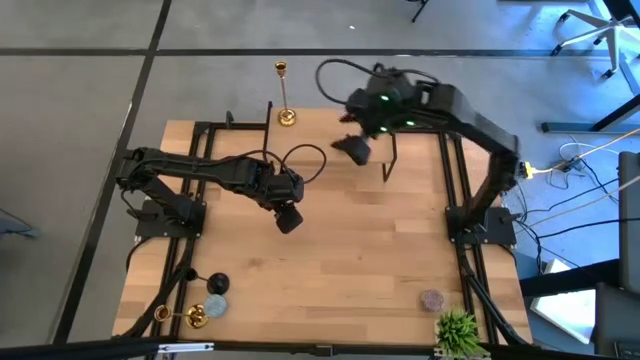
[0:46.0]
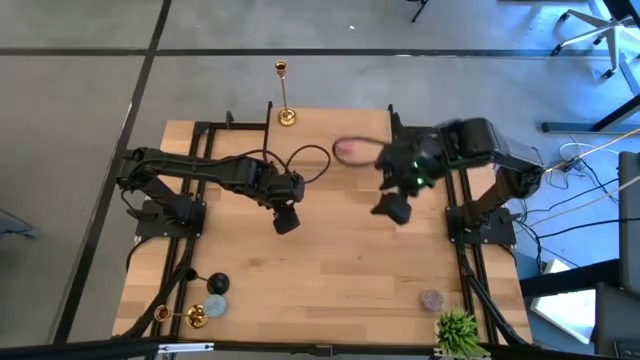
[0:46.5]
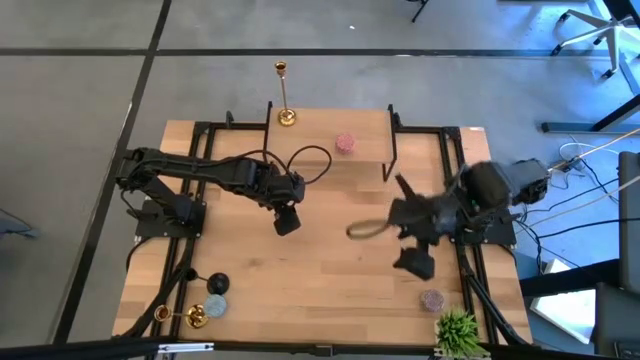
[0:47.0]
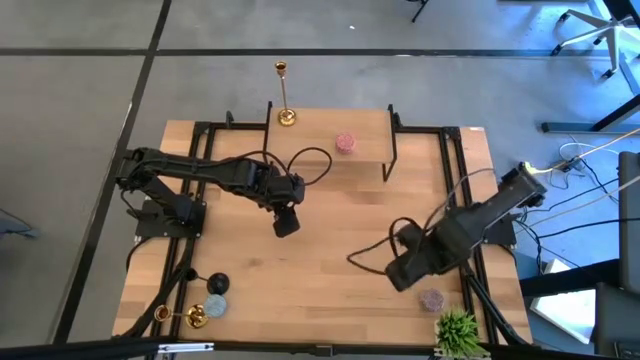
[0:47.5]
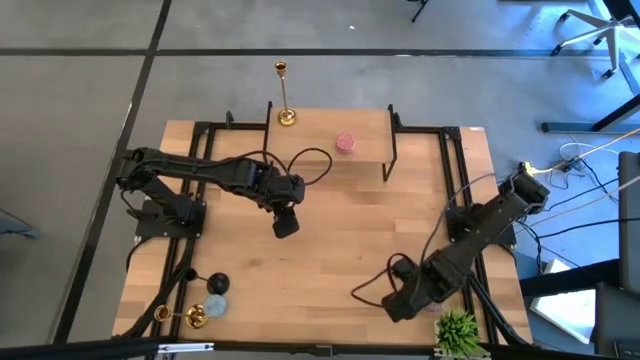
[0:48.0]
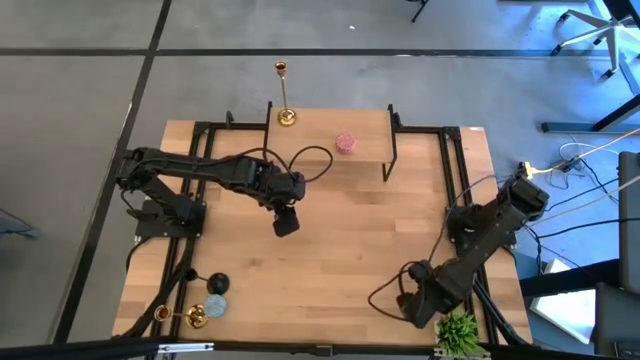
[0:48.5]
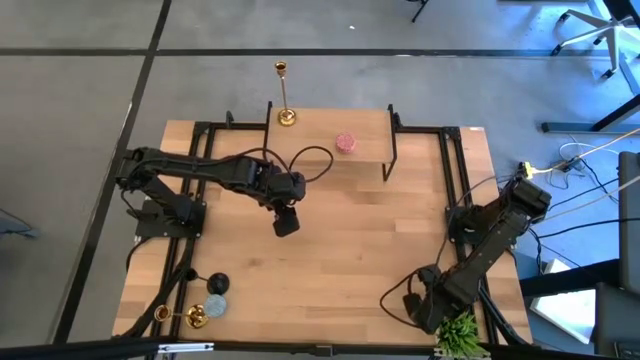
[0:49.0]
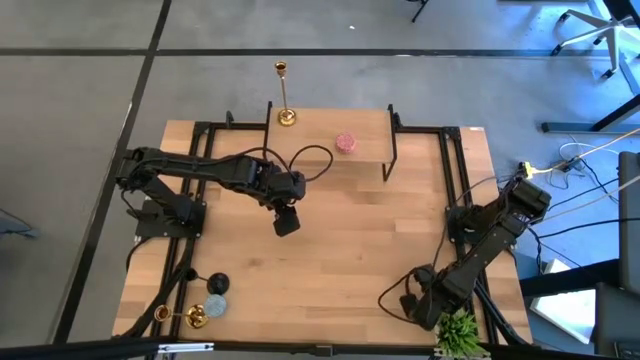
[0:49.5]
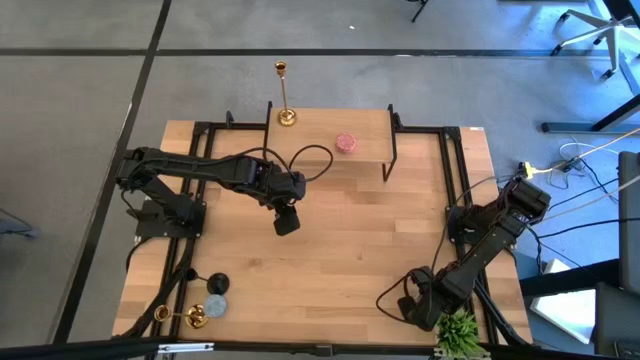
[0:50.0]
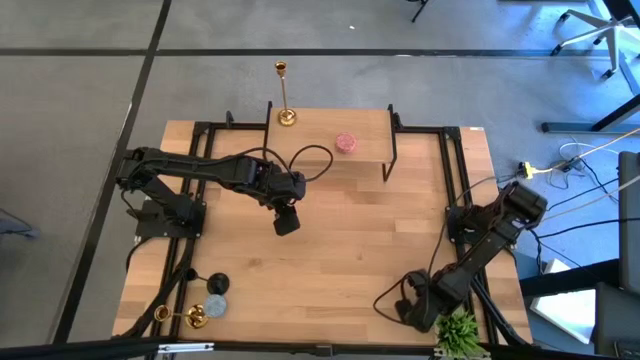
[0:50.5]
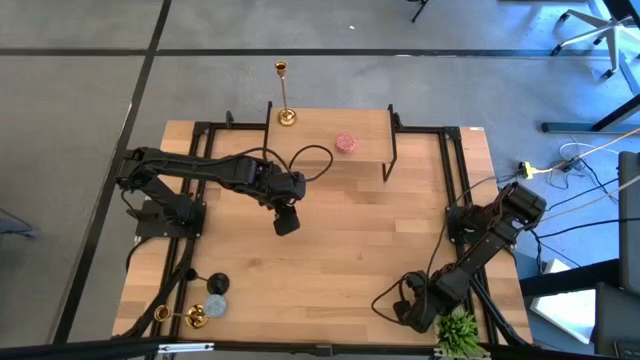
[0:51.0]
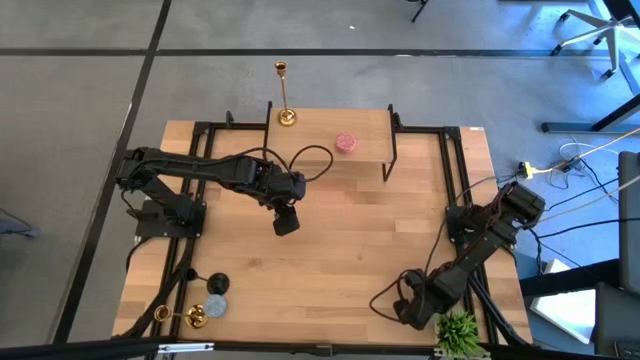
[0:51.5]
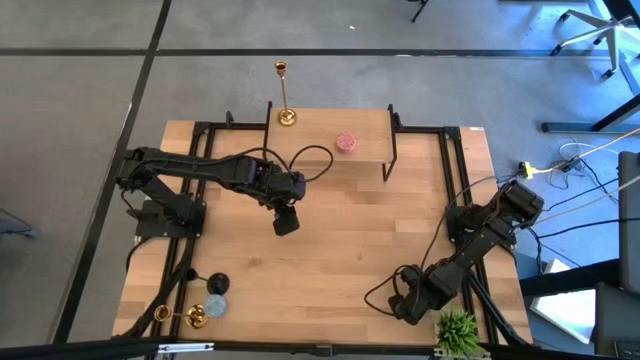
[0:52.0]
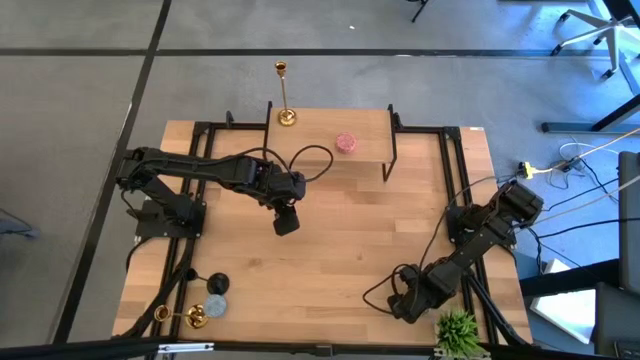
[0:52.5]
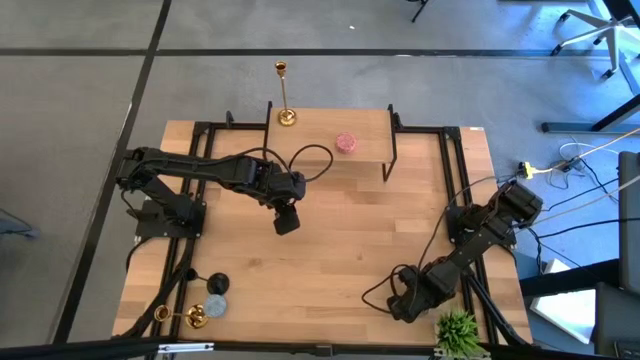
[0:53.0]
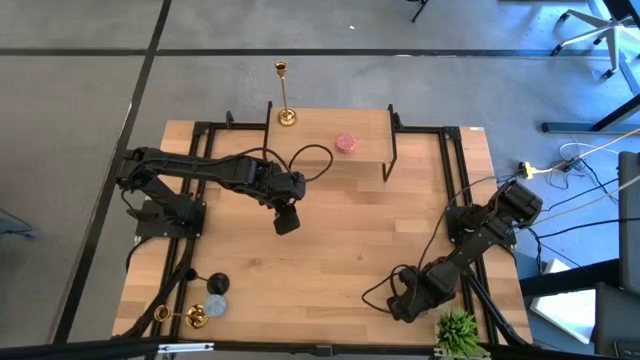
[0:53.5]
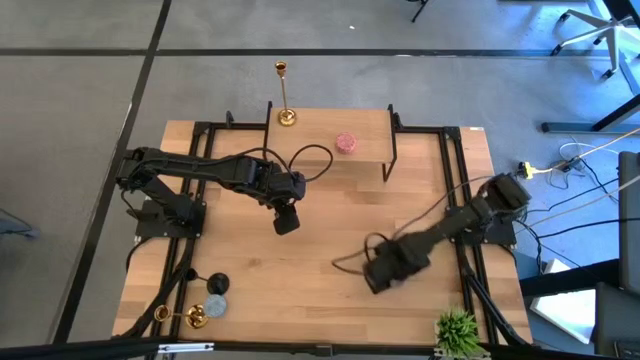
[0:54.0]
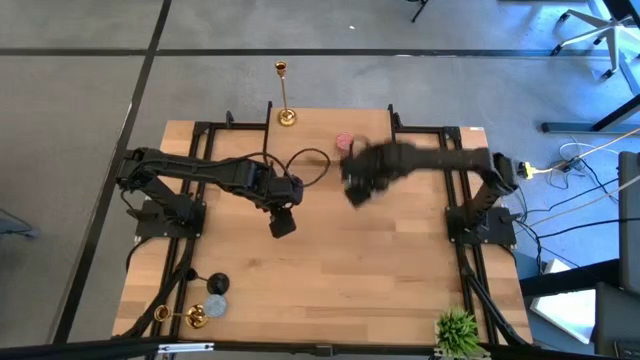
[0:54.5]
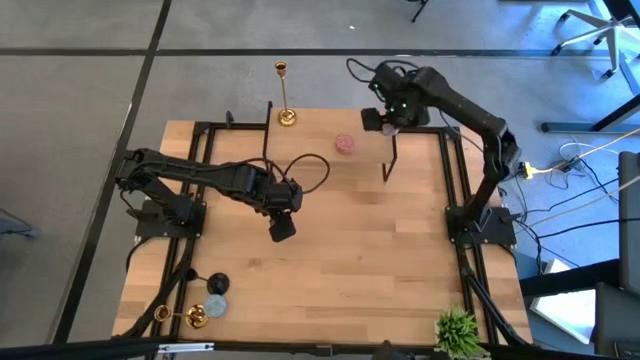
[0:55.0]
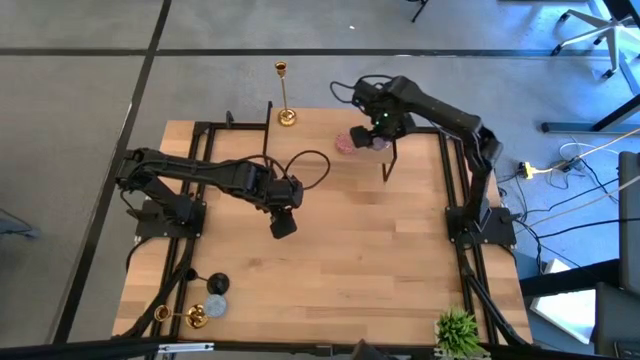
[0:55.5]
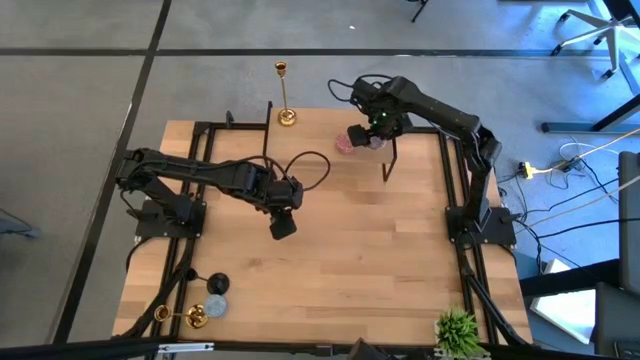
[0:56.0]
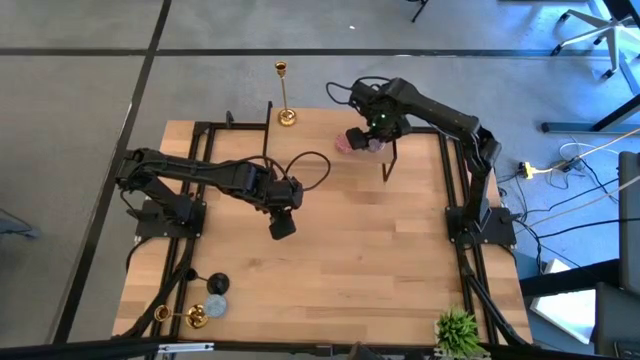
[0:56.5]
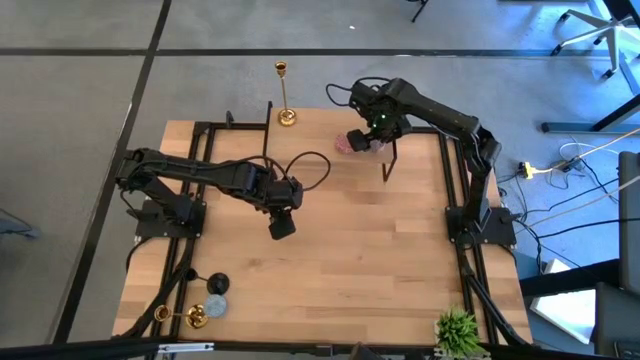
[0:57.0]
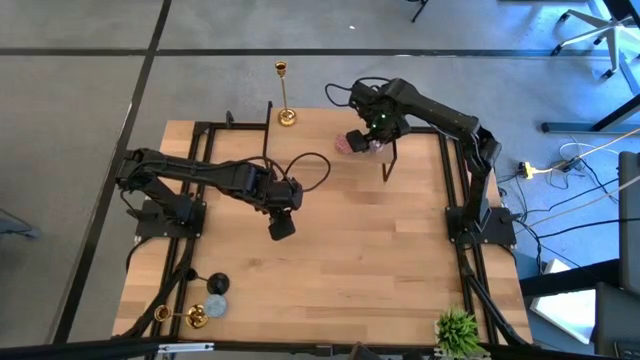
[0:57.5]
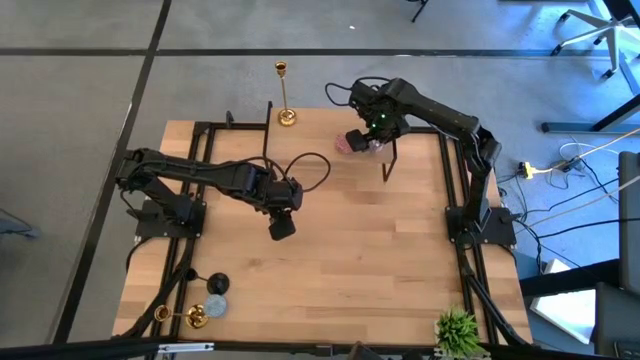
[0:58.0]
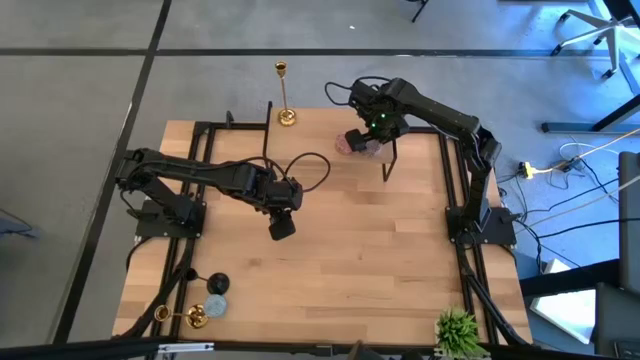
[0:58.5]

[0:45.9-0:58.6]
Task: Pick & Place candle stick holders
Put the white candle on the shelf

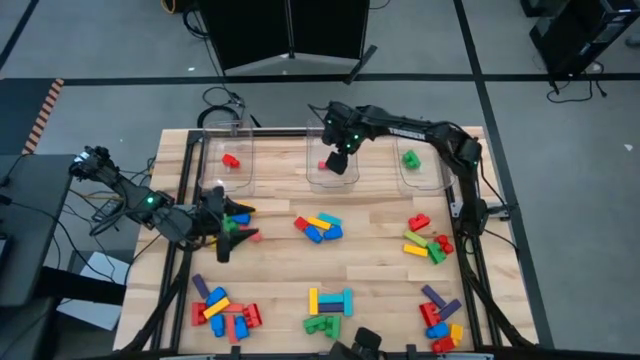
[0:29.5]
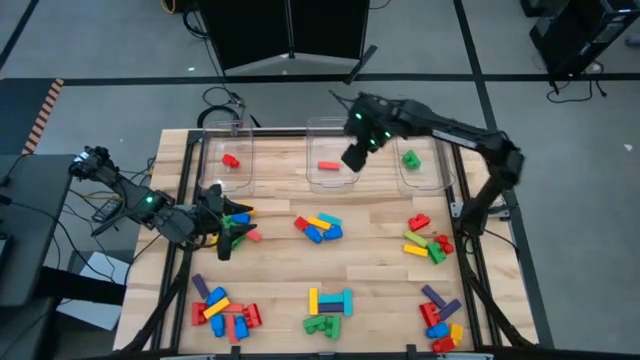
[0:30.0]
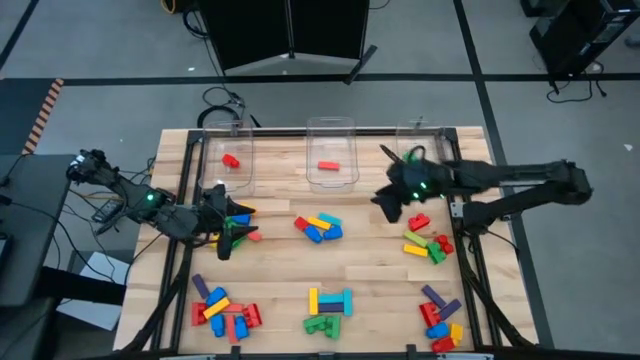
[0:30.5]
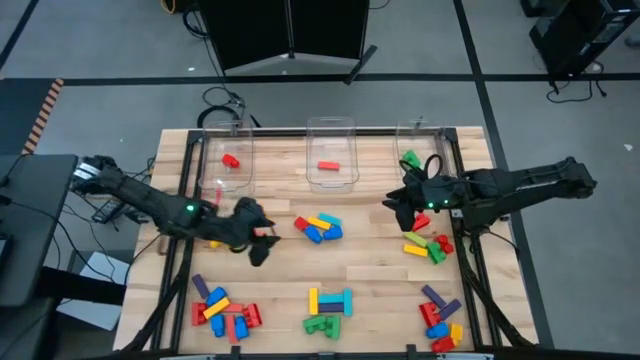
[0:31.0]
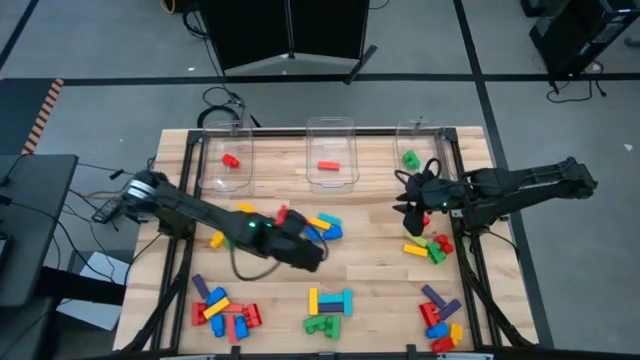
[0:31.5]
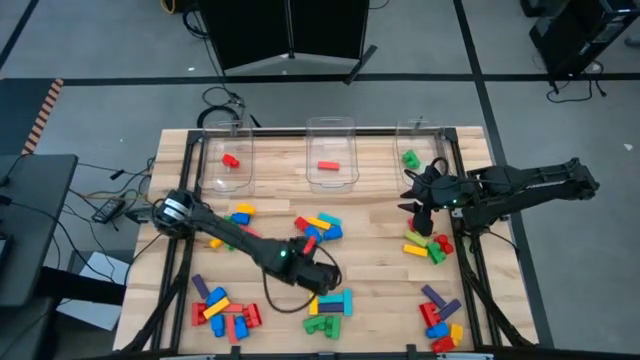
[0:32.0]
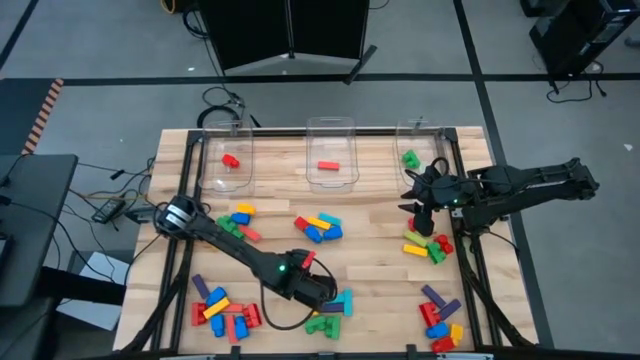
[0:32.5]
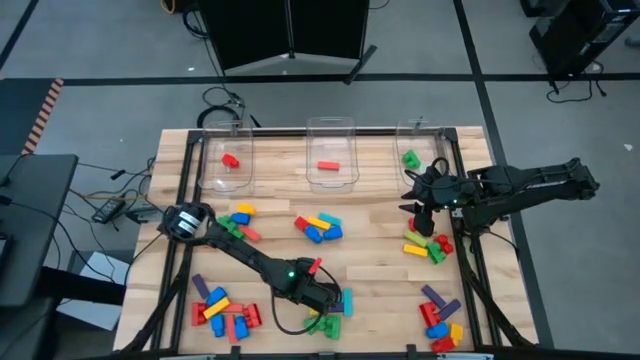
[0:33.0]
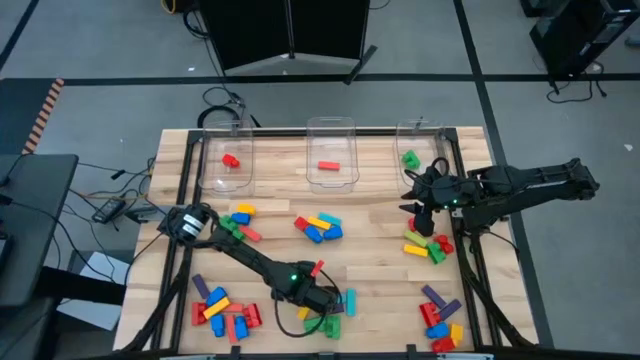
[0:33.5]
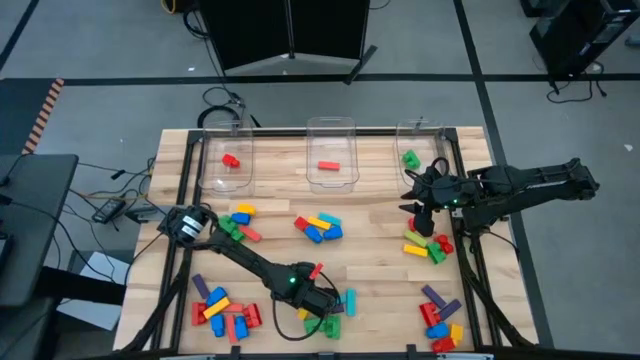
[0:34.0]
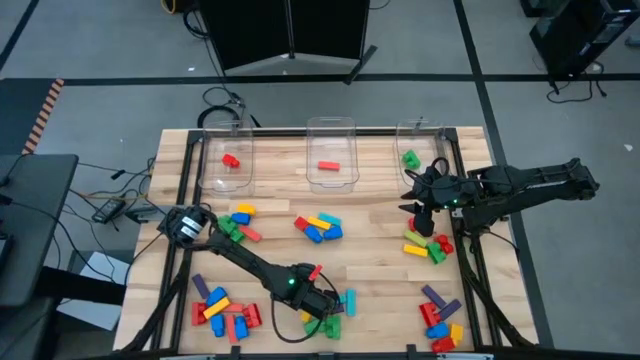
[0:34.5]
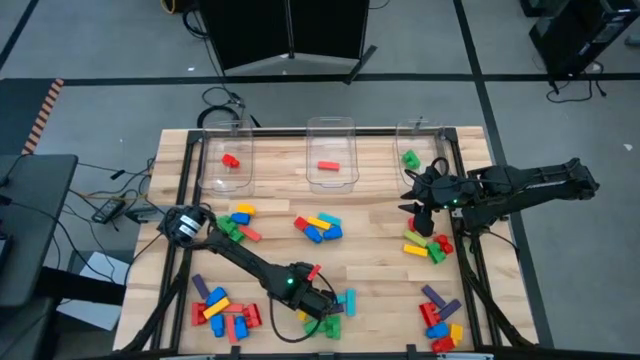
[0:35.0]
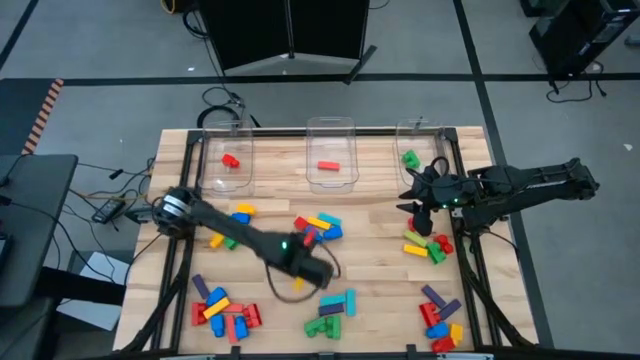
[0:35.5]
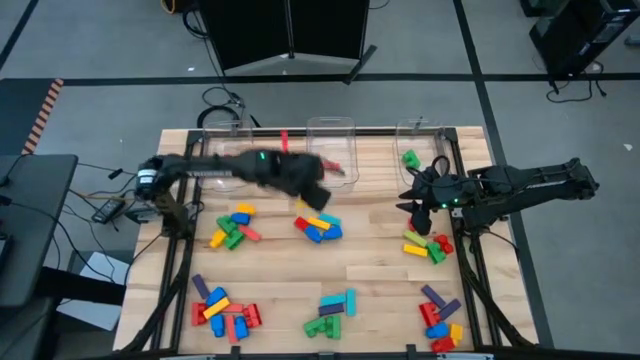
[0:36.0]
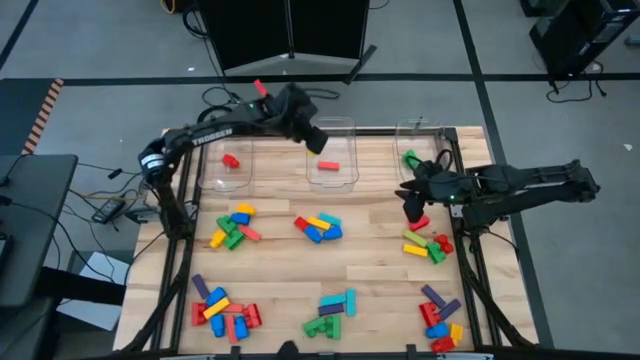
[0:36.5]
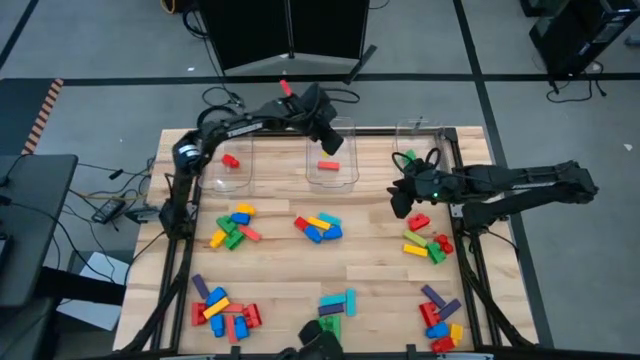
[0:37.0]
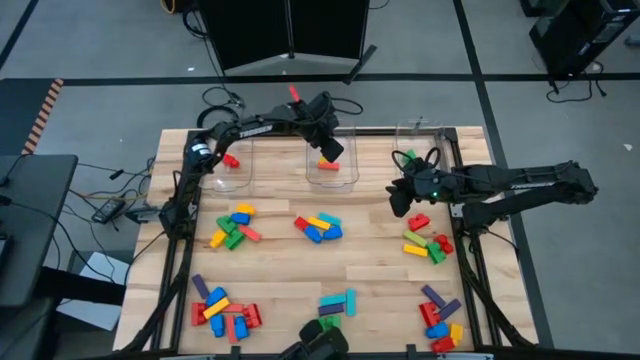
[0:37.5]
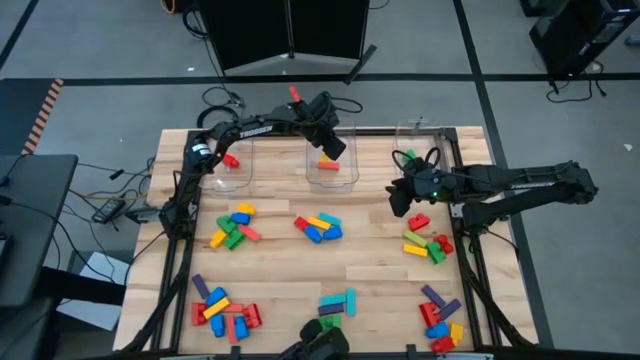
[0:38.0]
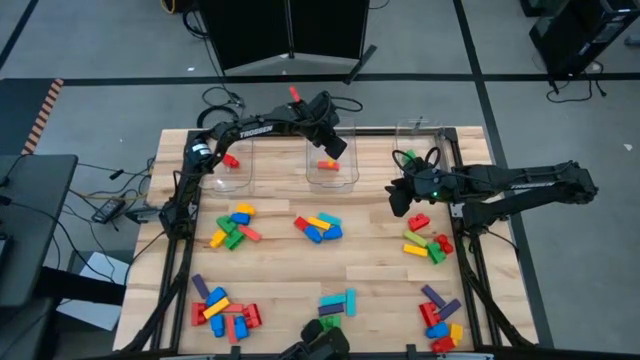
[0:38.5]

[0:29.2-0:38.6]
Task: Sort blocks by size
Put the yellow block into the middle transparent bin
